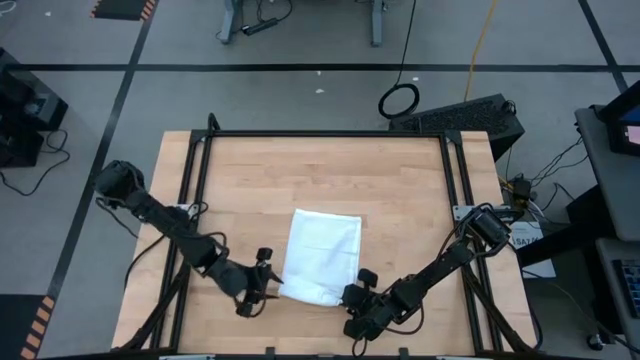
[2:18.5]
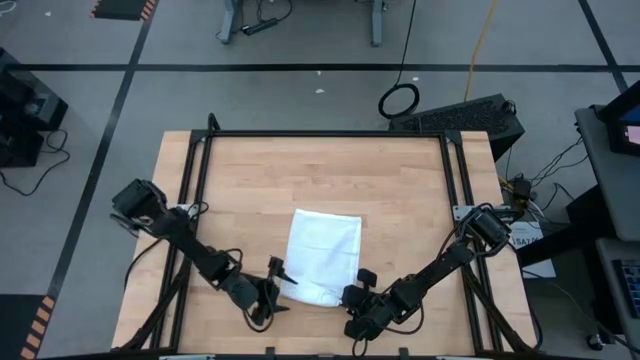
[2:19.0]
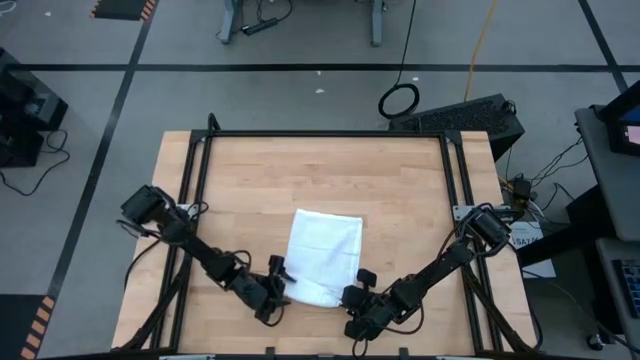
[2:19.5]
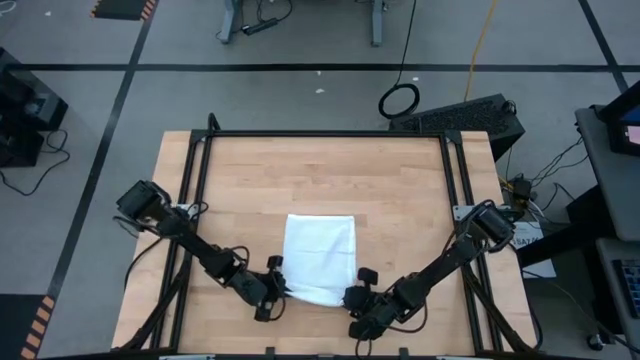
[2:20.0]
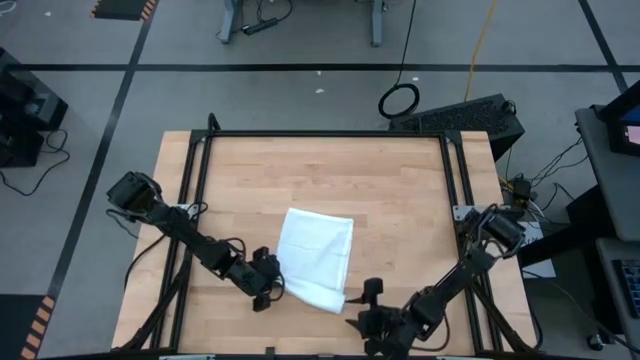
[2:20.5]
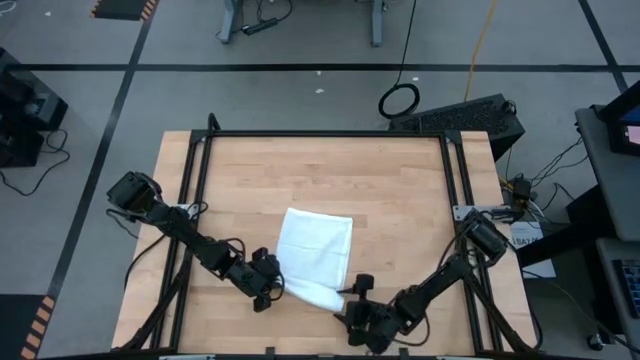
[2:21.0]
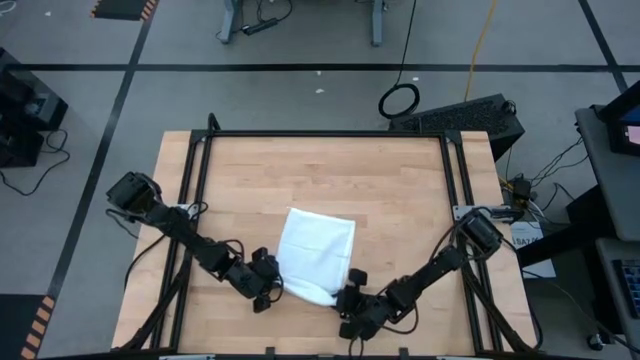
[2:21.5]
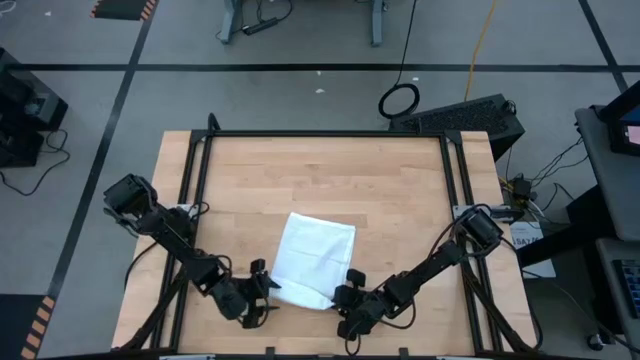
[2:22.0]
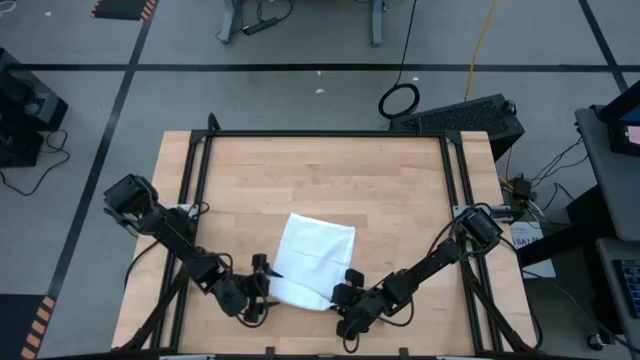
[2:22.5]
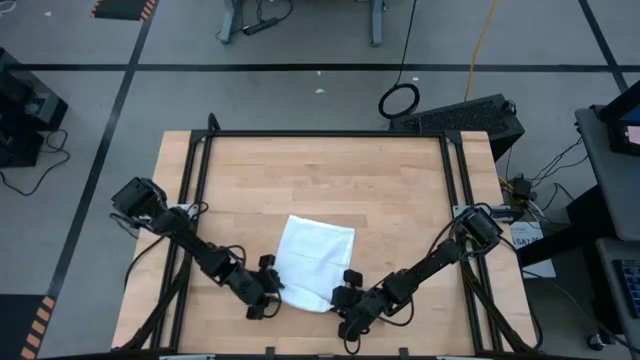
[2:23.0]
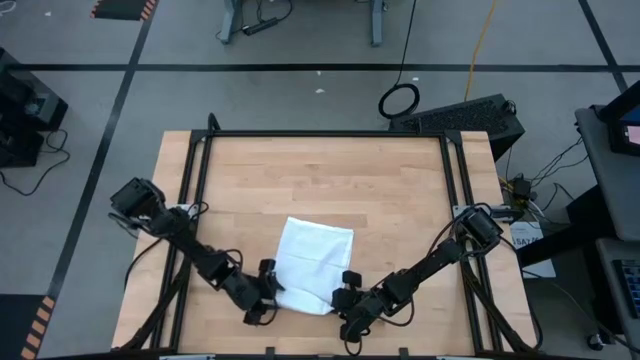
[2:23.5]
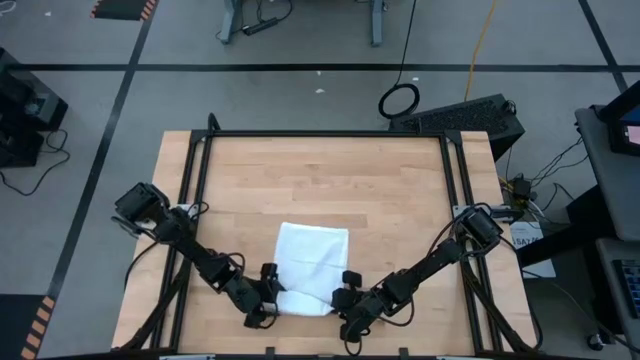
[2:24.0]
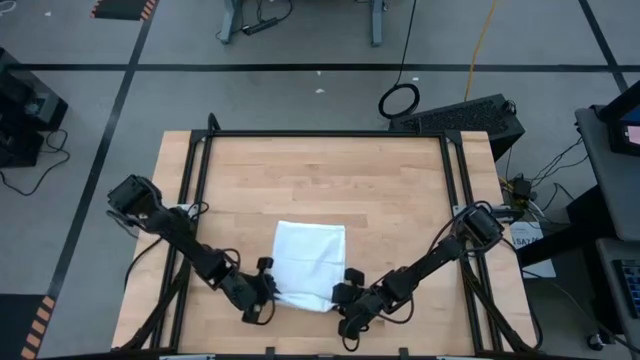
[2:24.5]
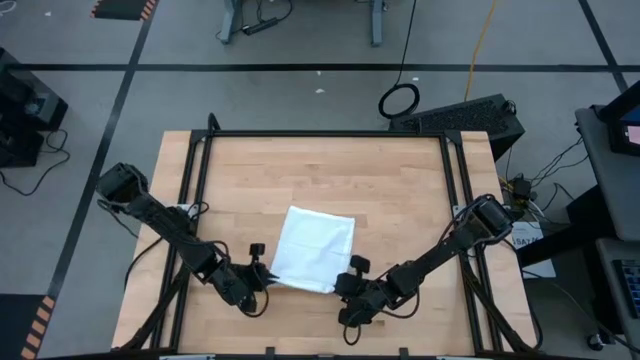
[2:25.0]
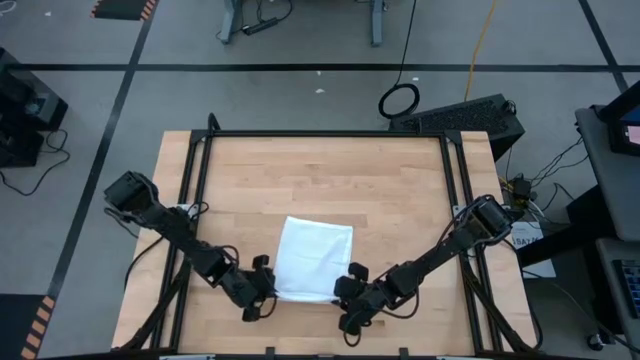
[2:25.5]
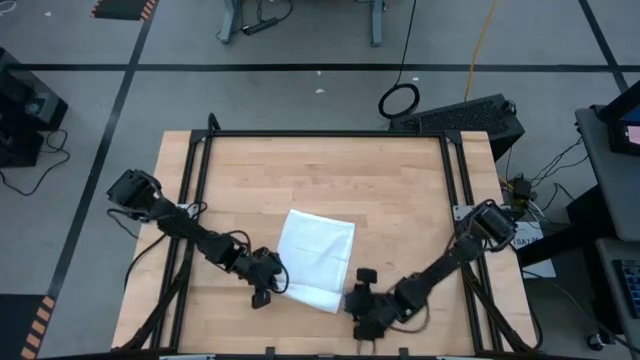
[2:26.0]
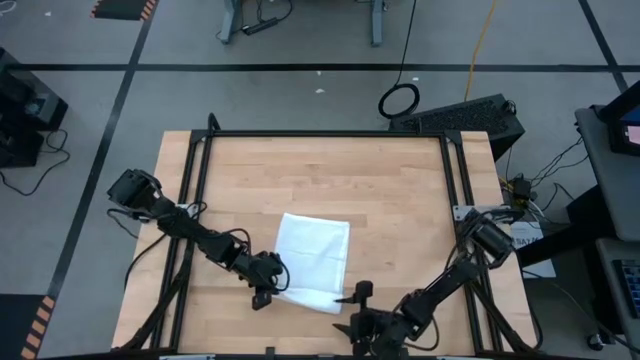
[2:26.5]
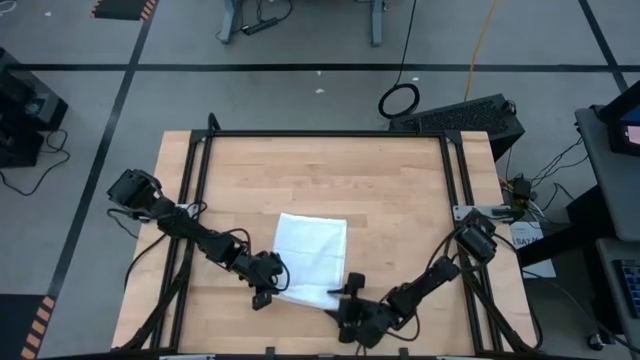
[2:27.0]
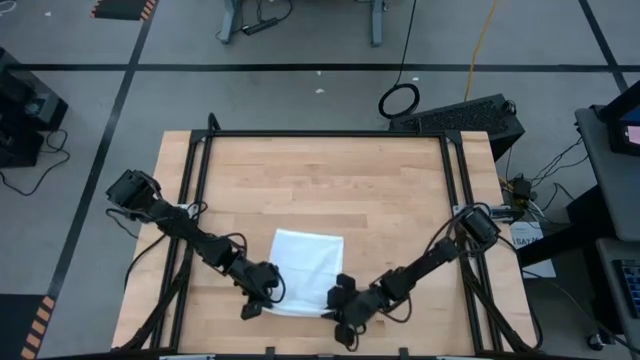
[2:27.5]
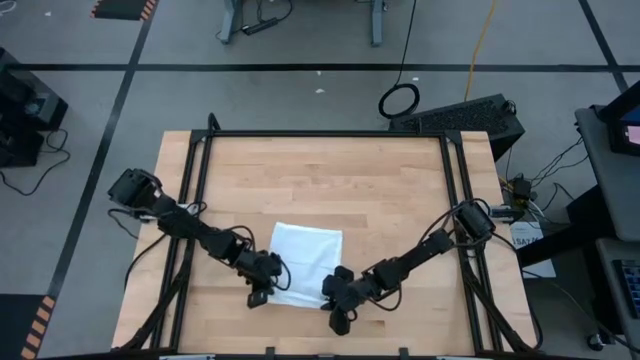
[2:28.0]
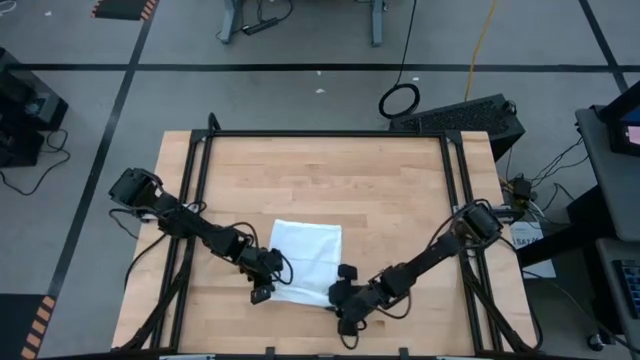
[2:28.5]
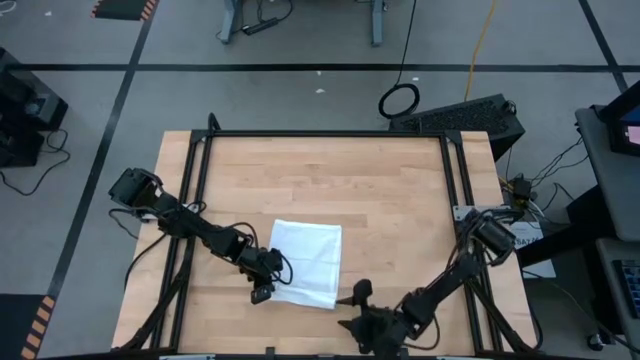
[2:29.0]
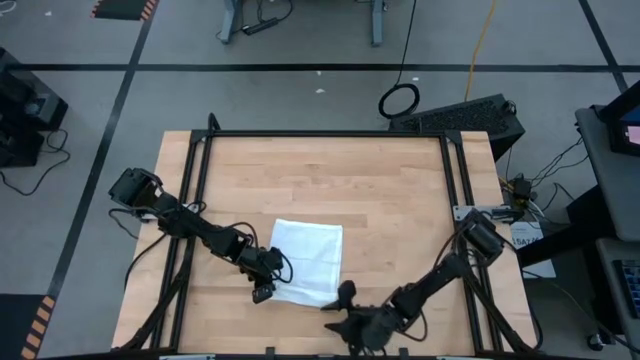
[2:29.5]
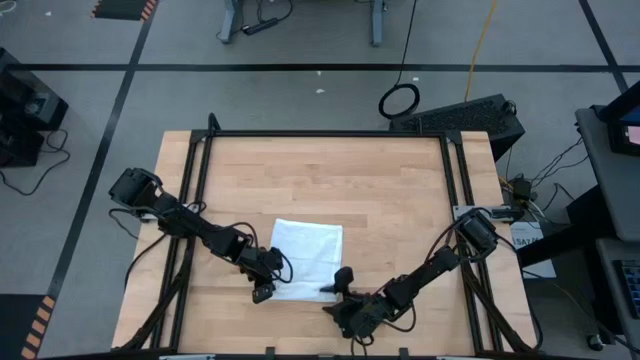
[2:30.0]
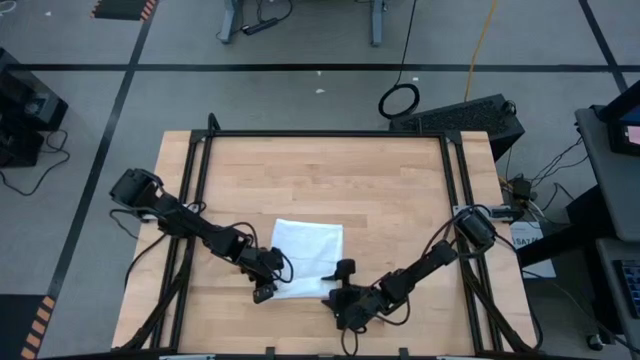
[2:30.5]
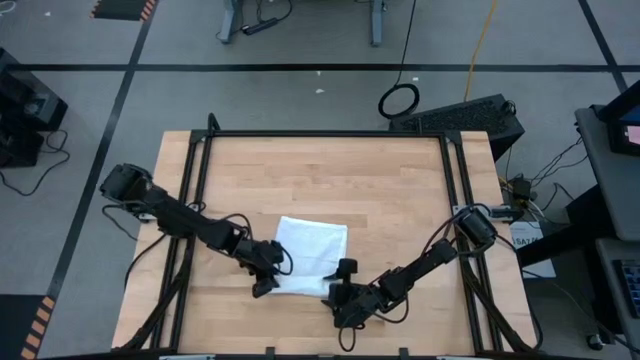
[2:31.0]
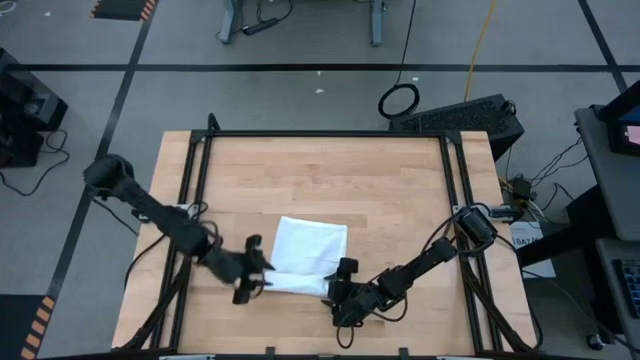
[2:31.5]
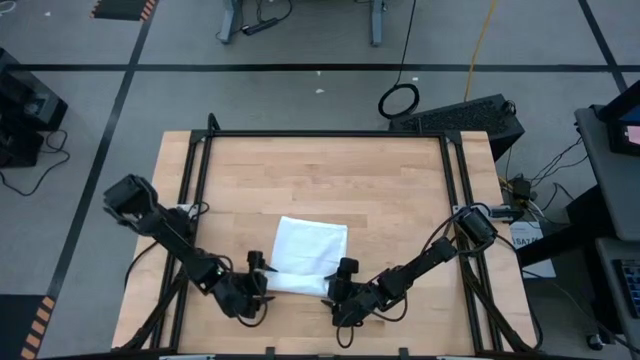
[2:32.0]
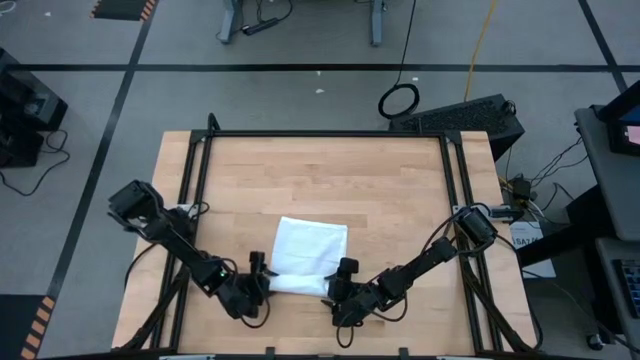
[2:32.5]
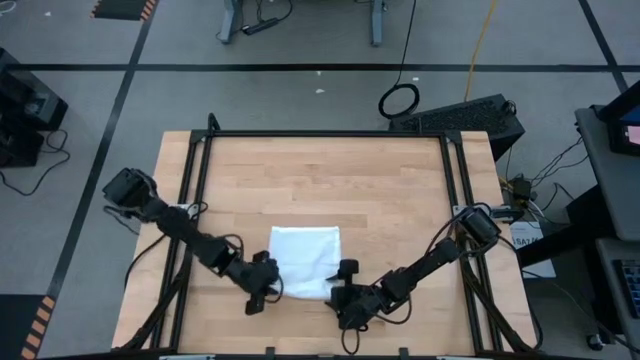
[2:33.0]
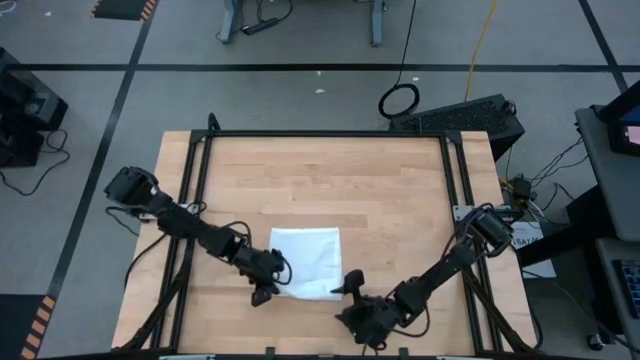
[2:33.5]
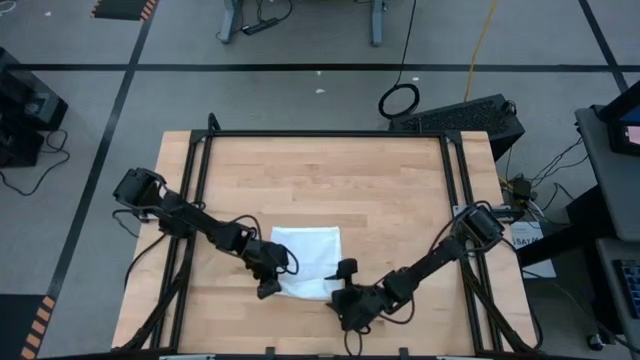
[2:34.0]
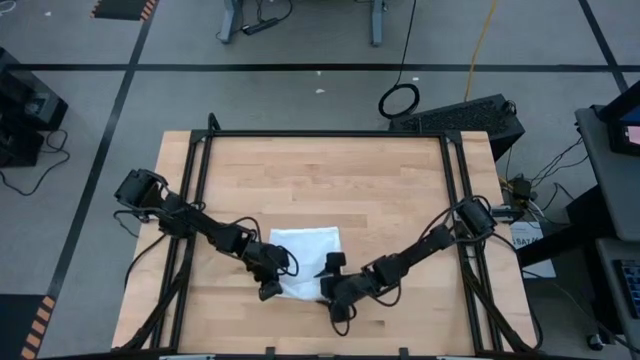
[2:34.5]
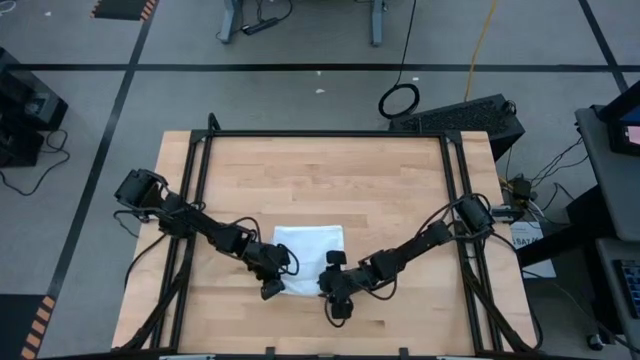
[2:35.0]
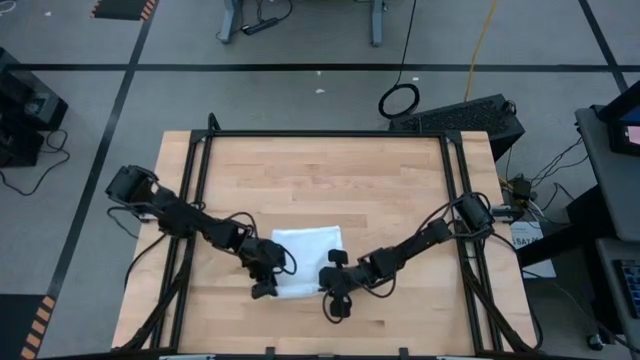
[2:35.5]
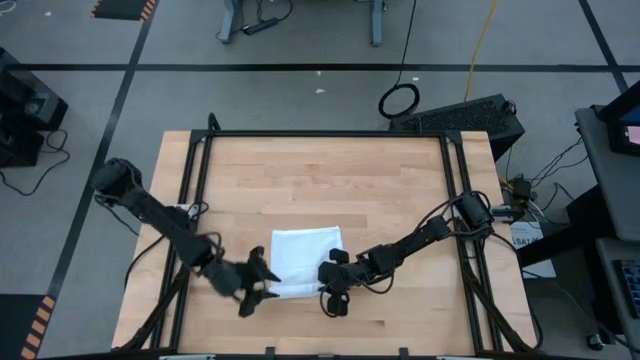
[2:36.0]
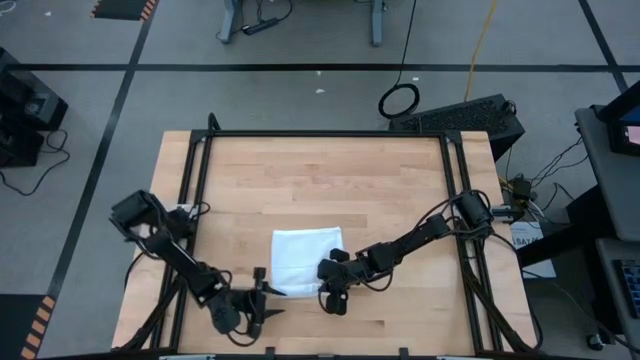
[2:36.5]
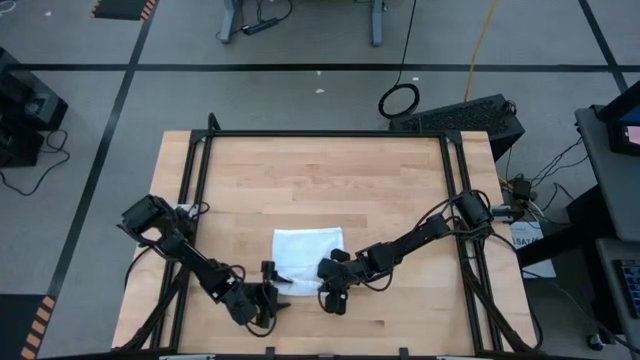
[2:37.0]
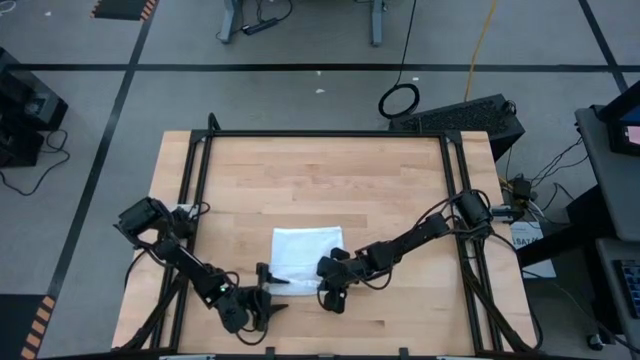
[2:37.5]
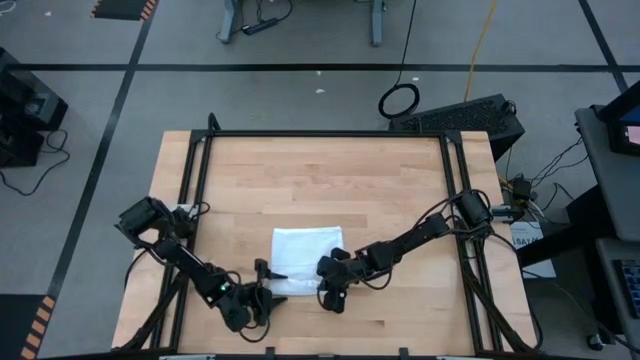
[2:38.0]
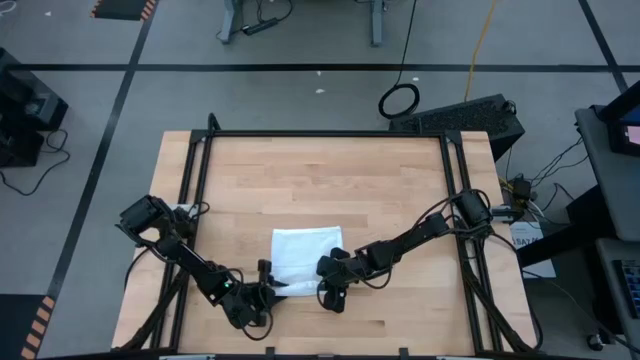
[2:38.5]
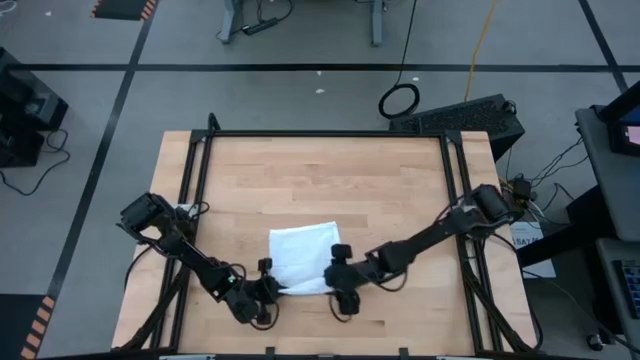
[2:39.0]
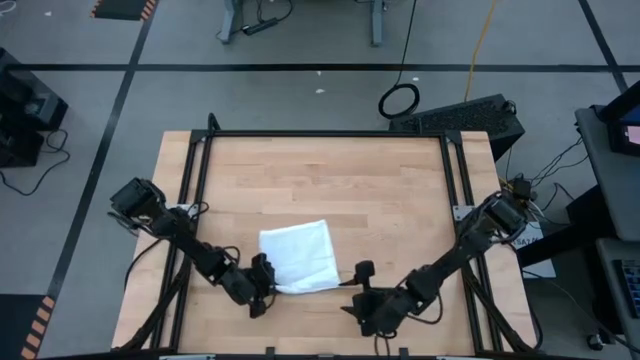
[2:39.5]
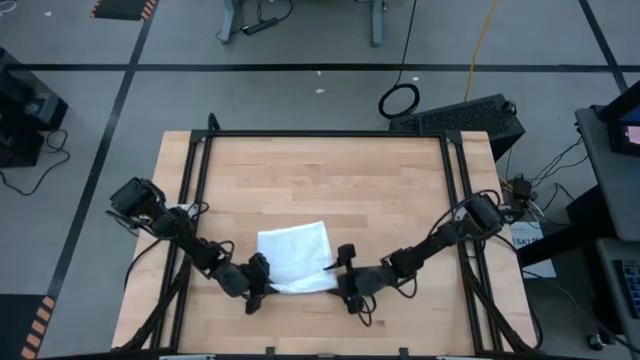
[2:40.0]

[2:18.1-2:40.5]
Task: Roll towel
Roll the white towel
